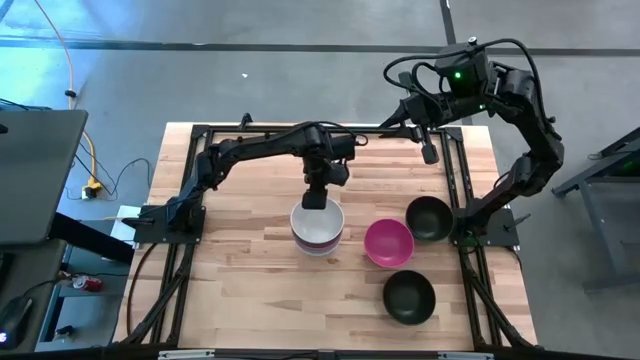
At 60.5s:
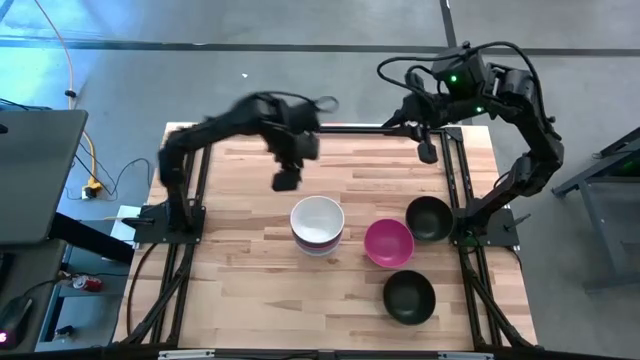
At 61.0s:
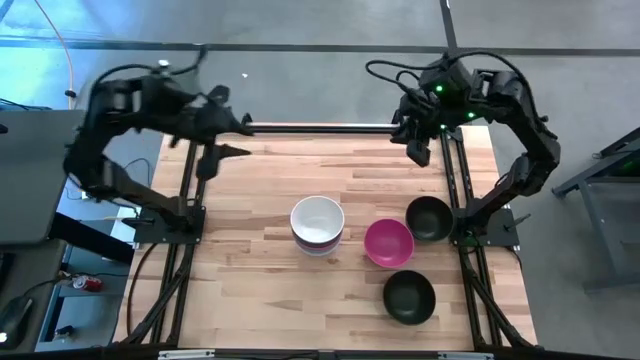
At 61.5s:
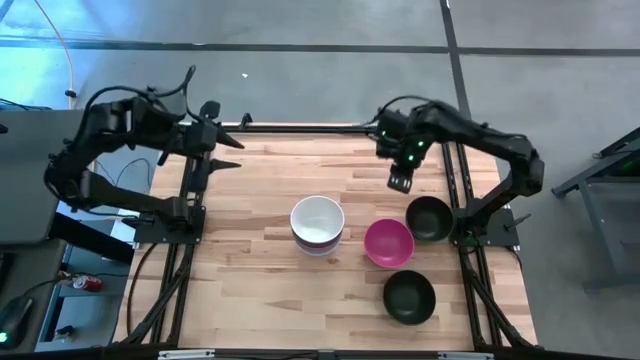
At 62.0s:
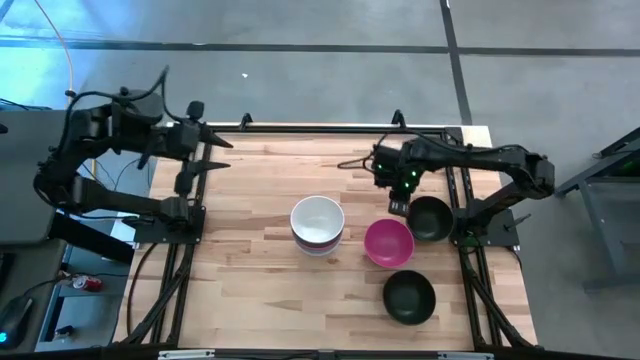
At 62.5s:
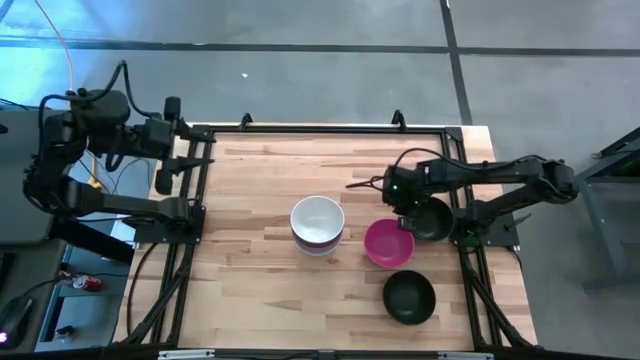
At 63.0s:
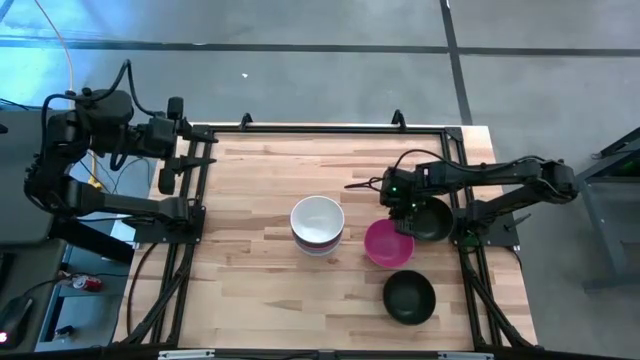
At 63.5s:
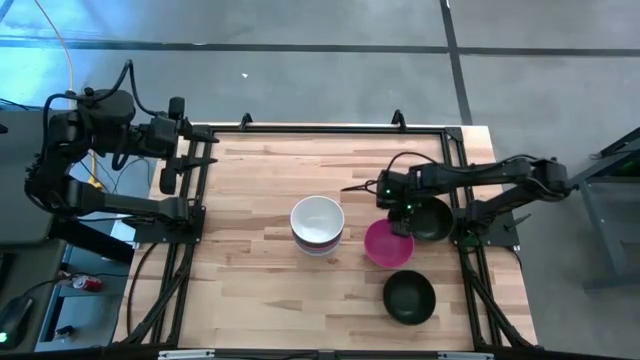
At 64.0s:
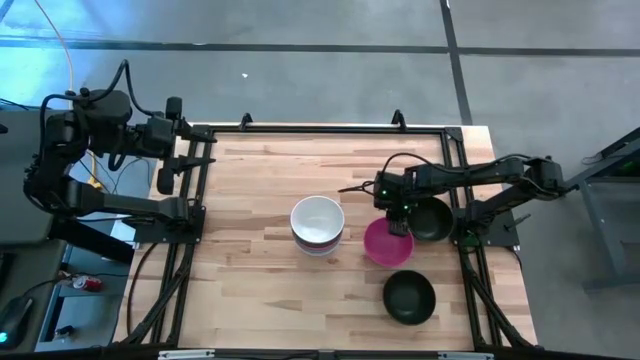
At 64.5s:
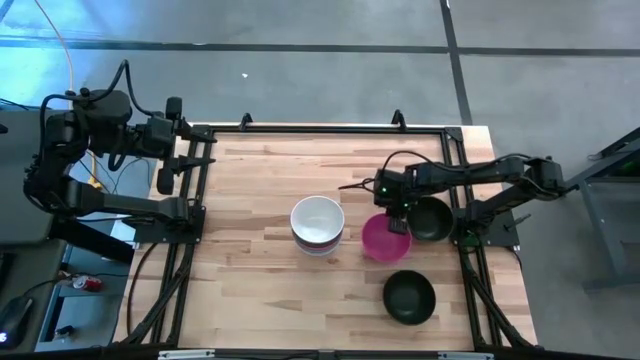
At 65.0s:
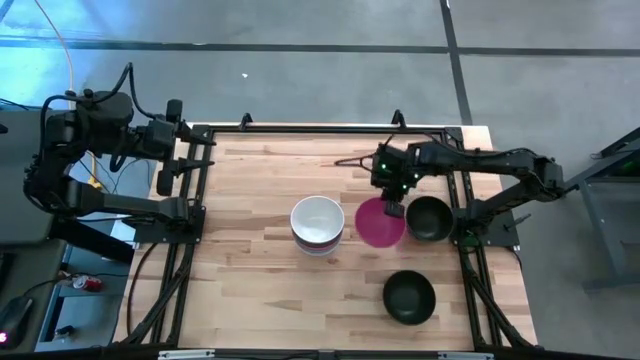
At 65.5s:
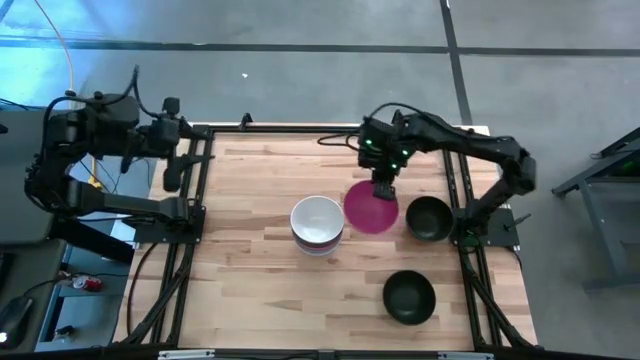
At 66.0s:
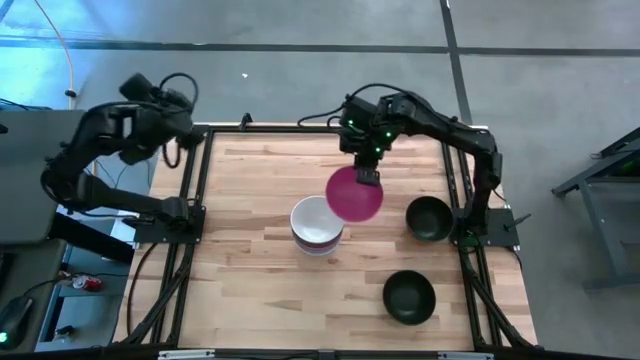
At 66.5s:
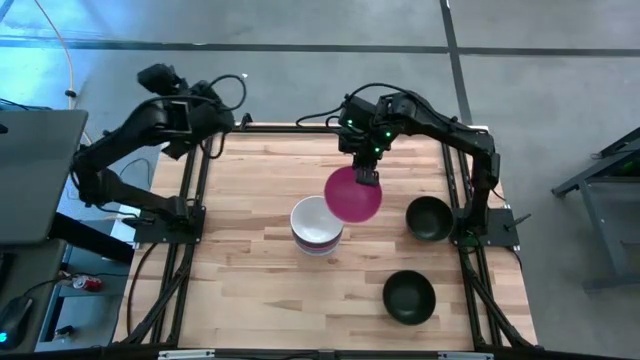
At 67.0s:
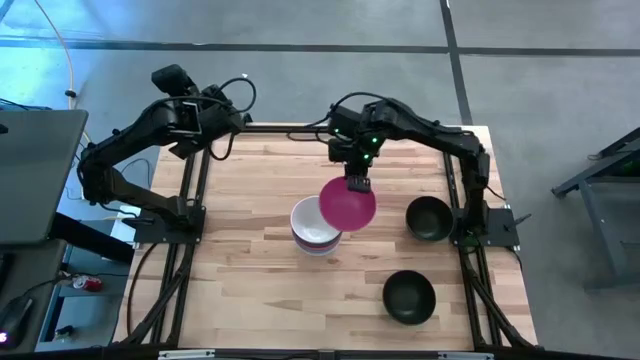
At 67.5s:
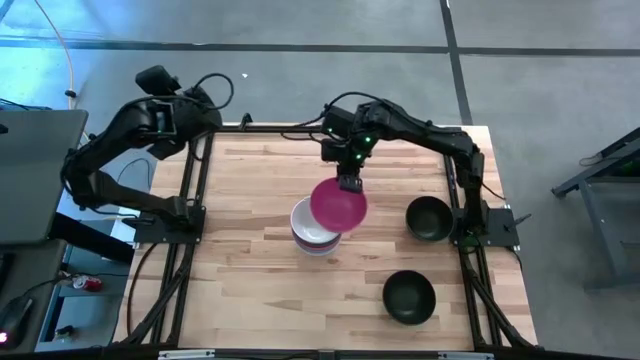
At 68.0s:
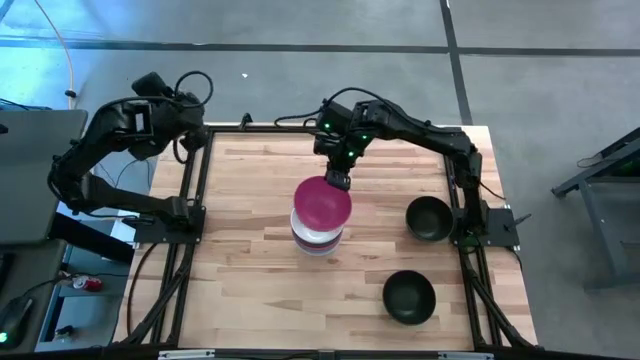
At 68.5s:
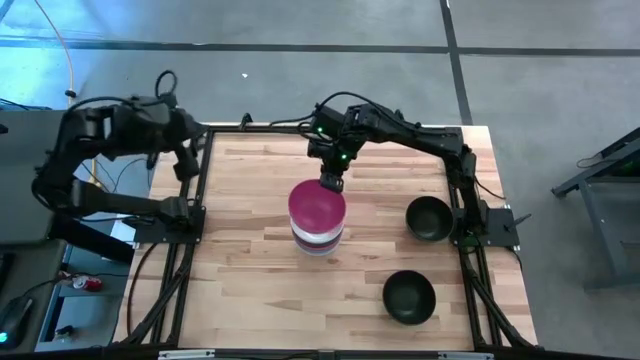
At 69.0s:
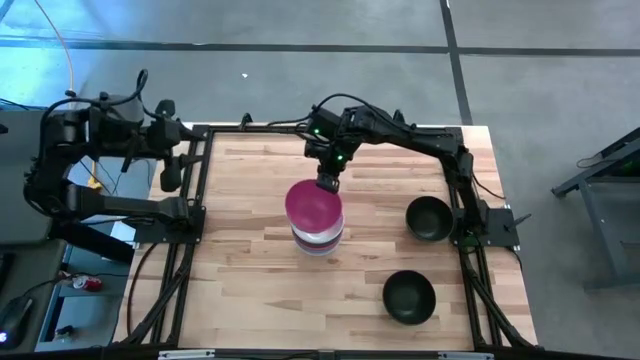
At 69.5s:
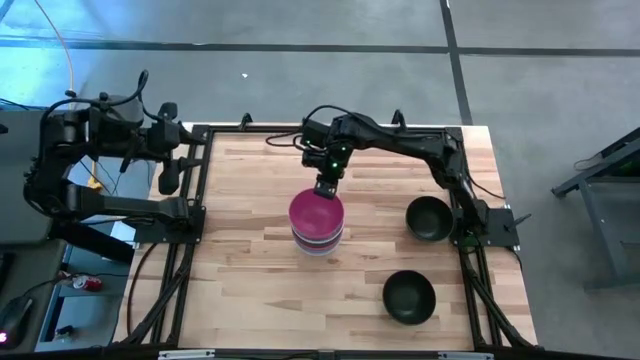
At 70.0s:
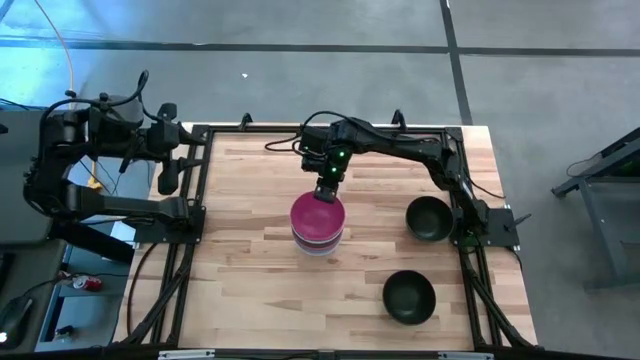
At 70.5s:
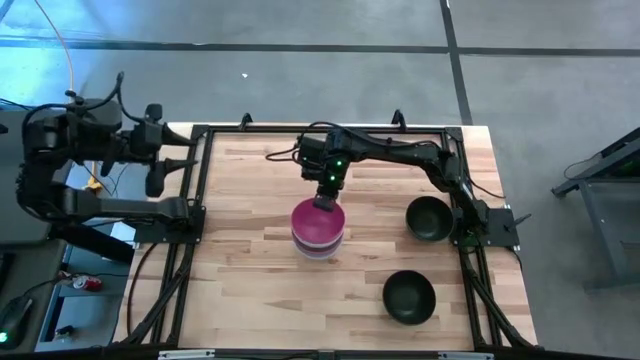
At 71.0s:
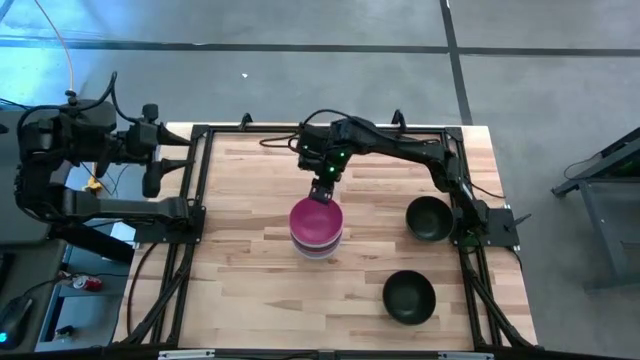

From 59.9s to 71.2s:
Task: Nest bowls inside each other
Stack the pink bowl on top of the white bowl

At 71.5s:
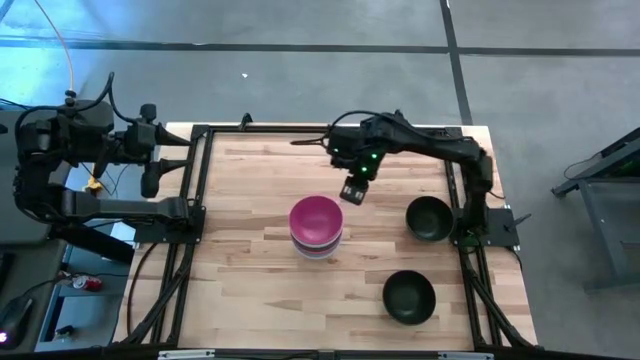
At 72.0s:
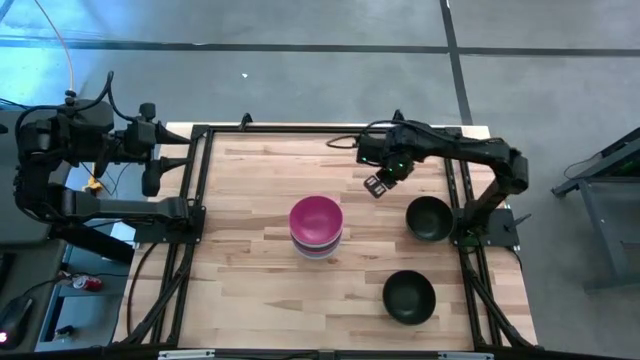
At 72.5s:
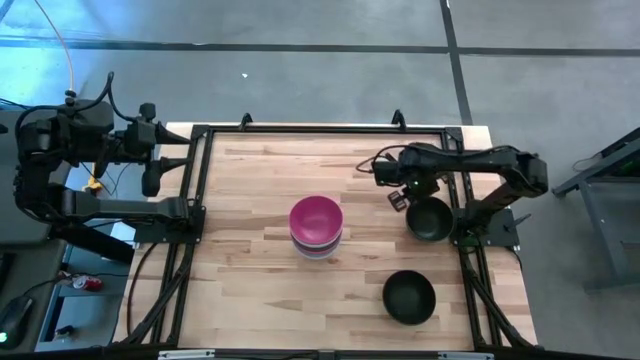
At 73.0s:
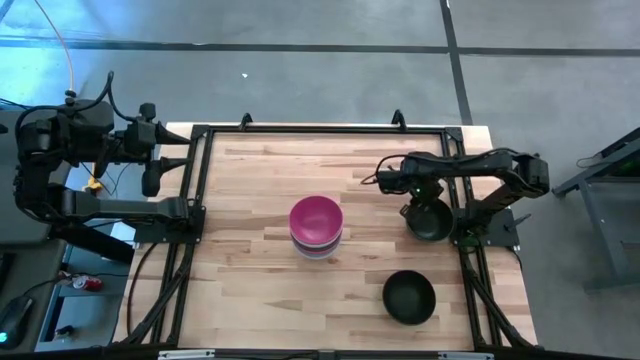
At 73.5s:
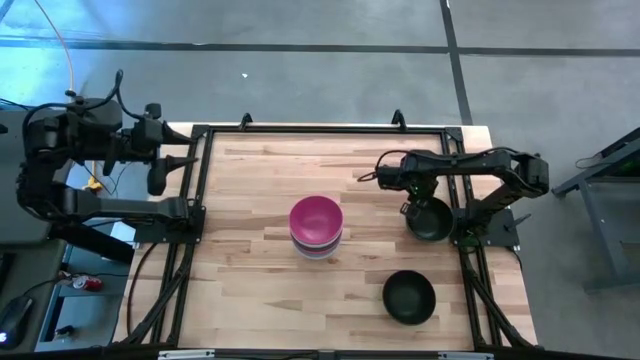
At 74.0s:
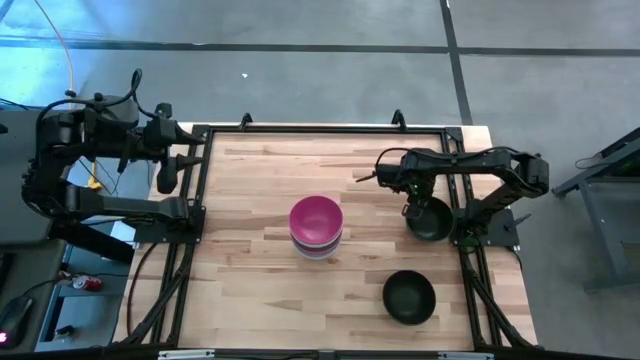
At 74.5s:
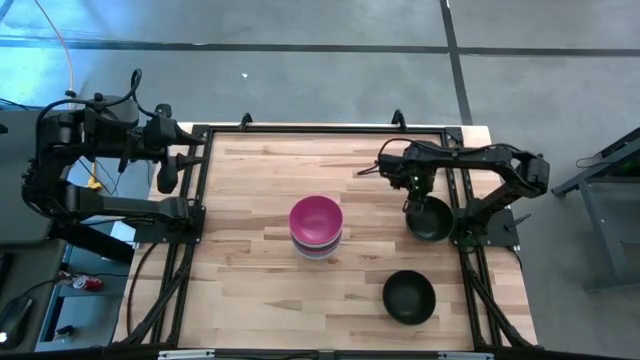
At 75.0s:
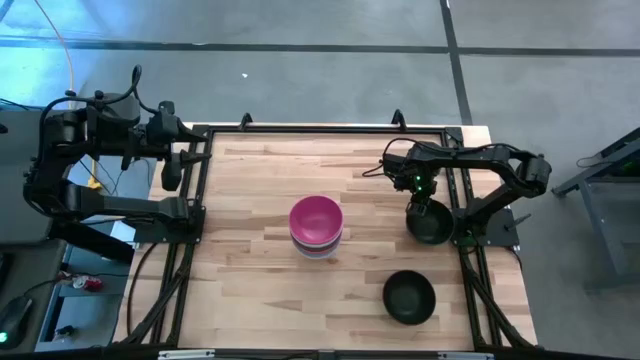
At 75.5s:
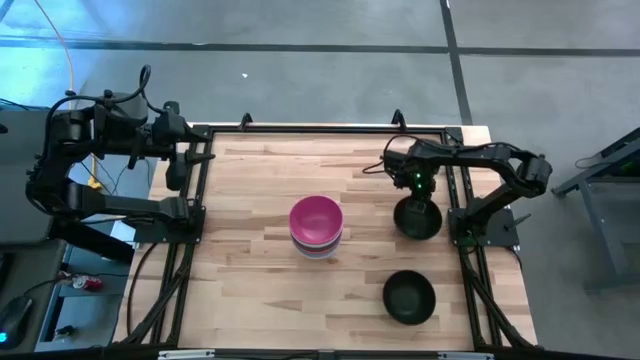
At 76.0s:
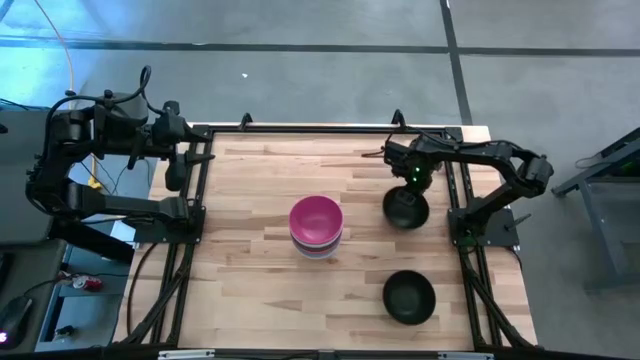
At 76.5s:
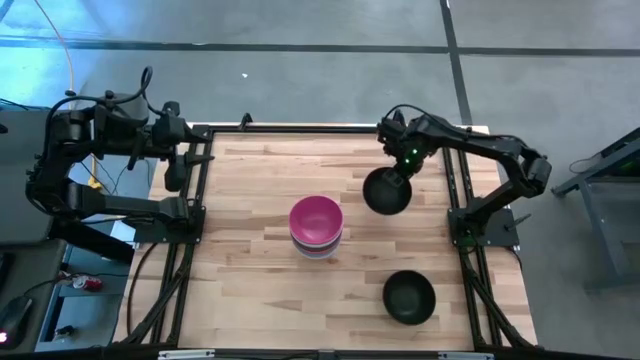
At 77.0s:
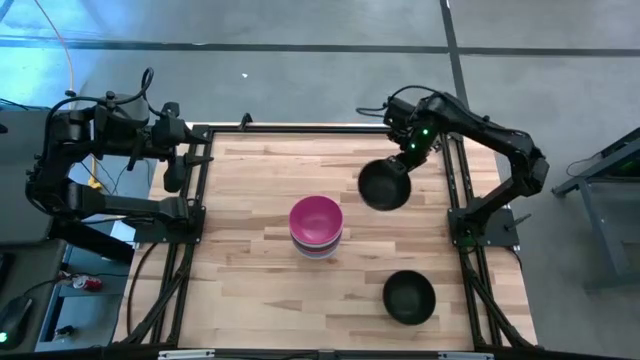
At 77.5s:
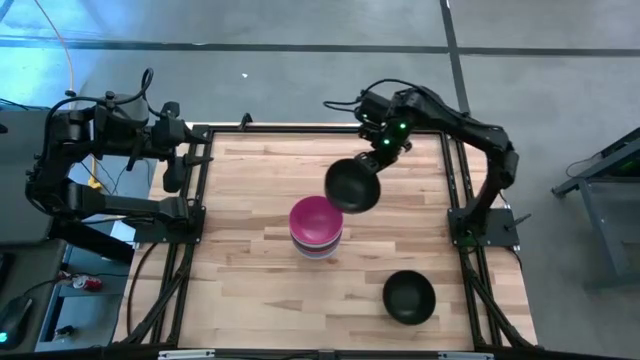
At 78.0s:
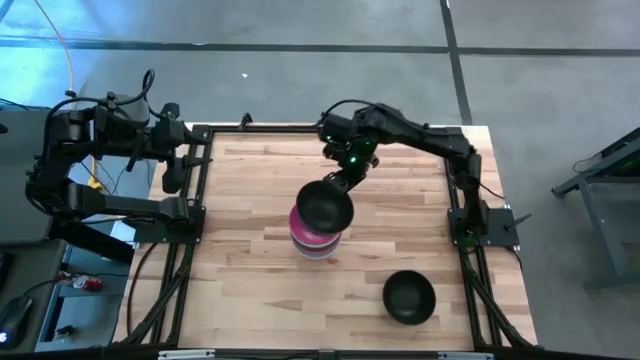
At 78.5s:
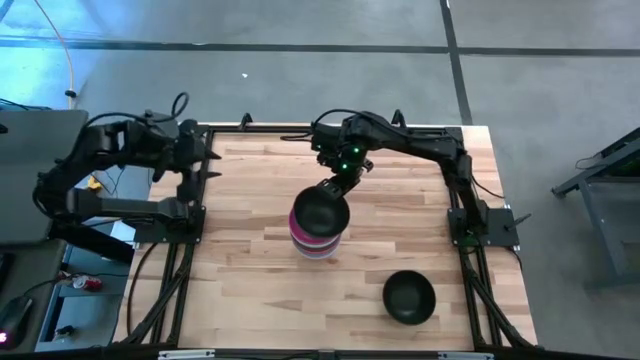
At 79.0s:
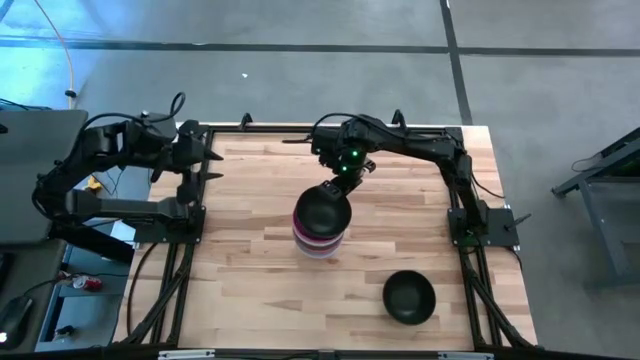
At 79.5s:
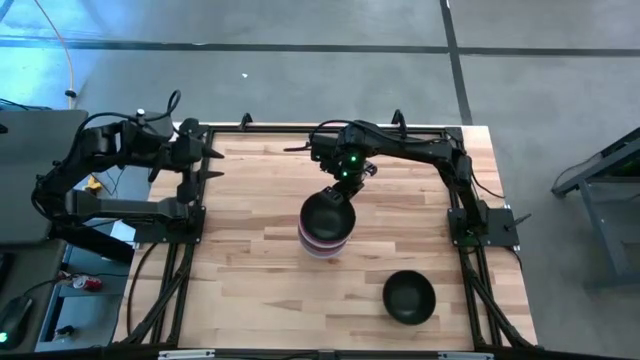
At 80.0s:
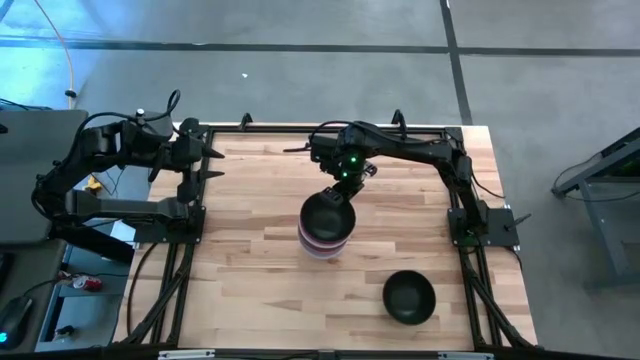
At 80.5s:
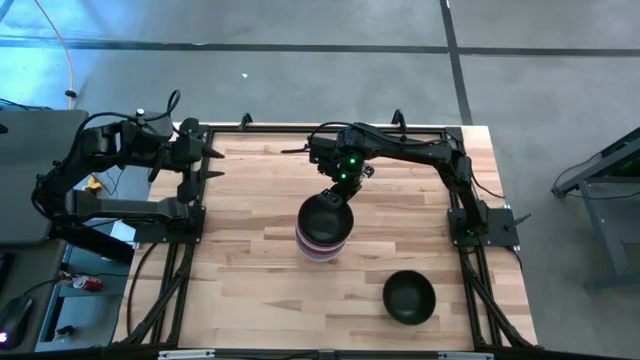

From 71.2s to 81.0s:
Stack the top black bowl on top of the pink bowl

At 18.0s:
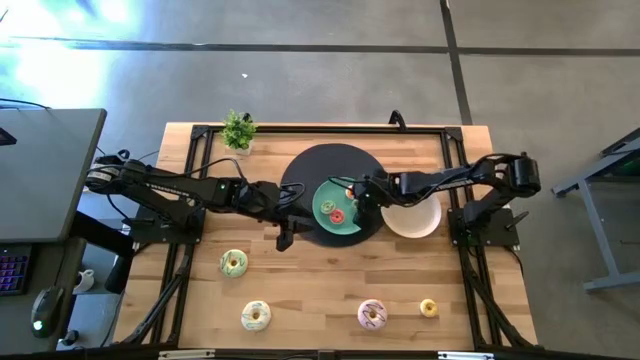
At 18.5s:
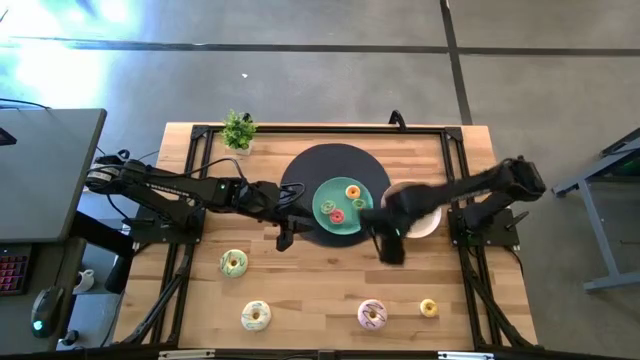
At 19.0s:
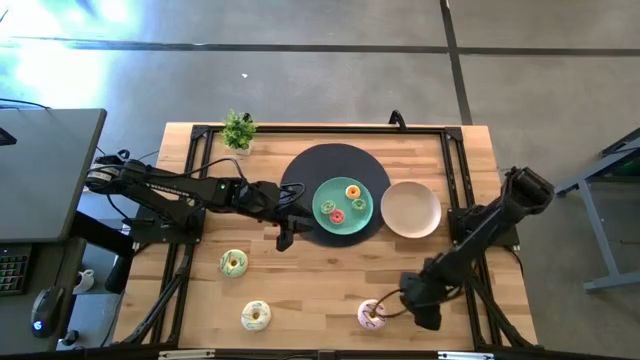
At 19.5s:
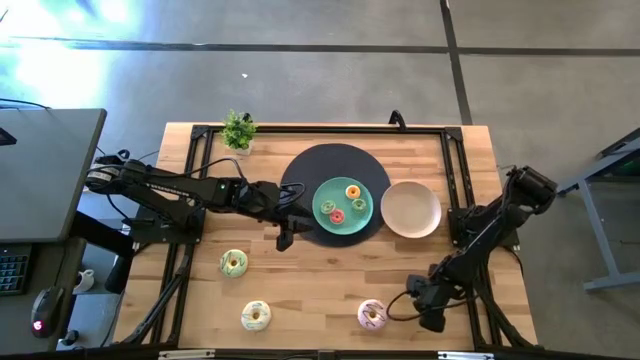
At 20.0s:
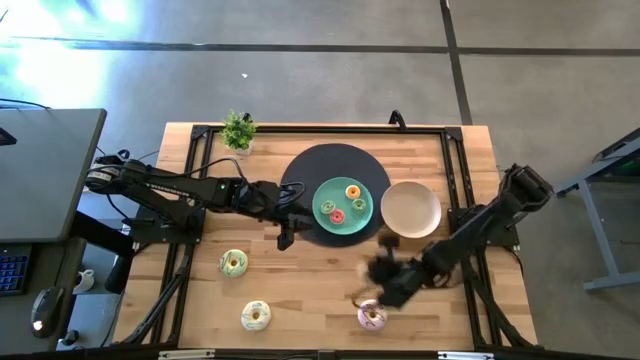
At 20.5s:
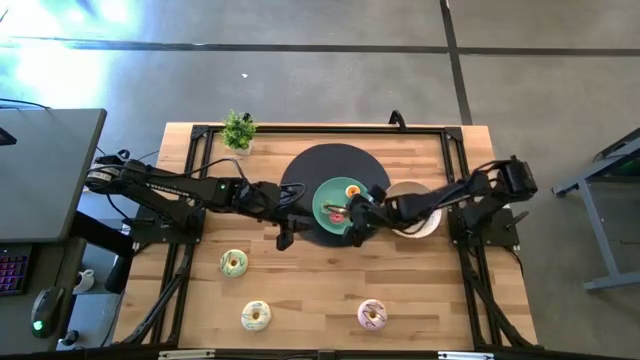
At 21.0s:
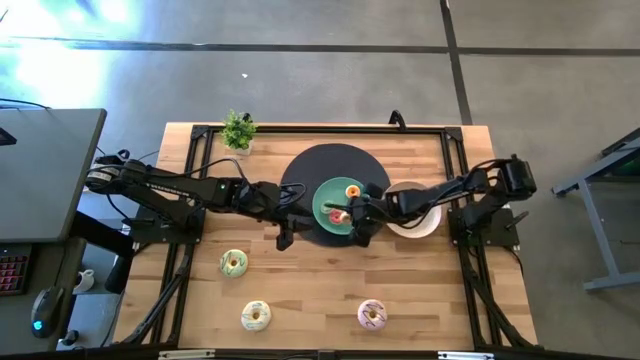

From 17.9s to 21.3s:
Task: Pick & Place donuts
Put the small yellow donut into the blue plate
